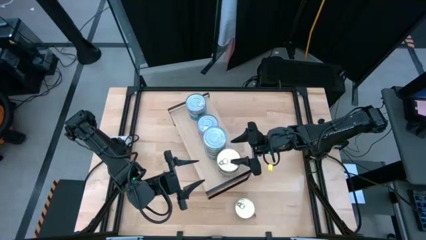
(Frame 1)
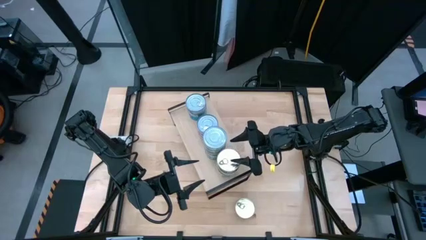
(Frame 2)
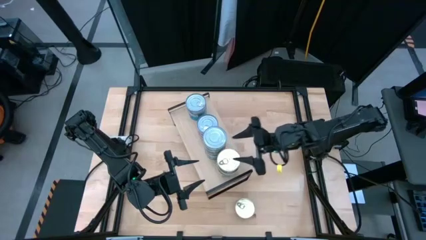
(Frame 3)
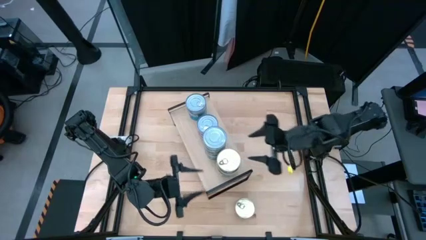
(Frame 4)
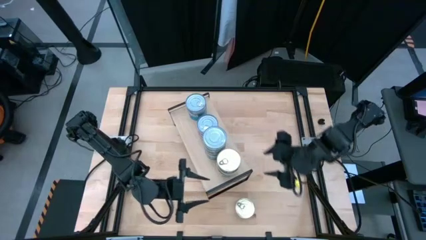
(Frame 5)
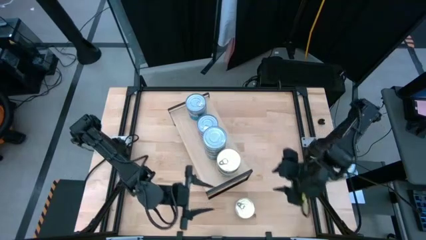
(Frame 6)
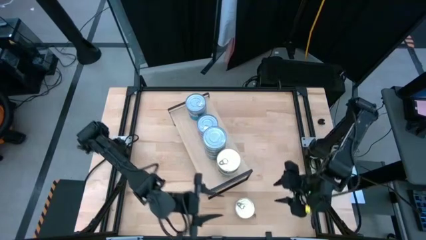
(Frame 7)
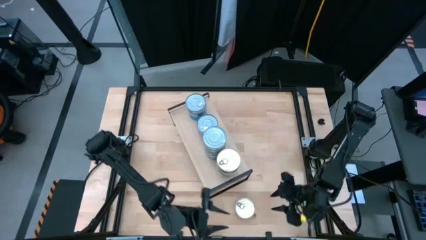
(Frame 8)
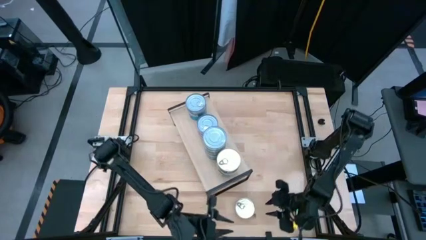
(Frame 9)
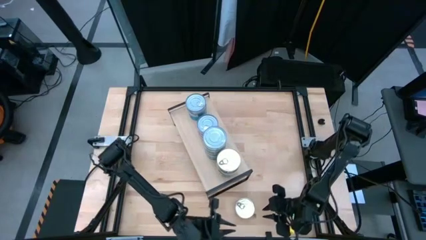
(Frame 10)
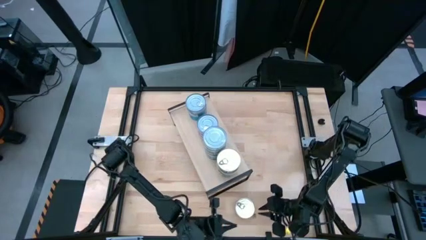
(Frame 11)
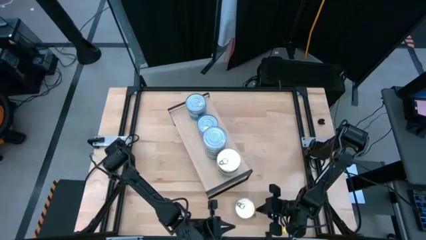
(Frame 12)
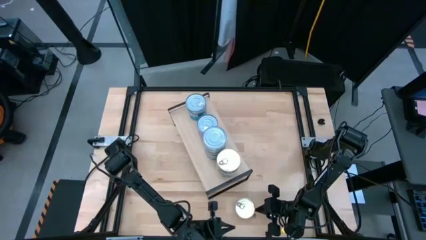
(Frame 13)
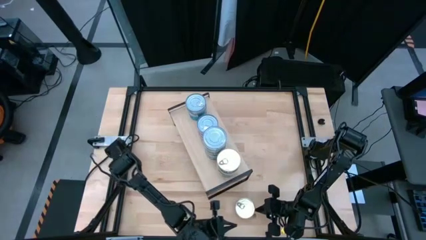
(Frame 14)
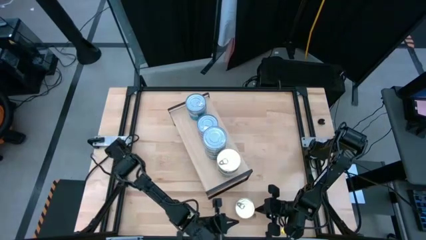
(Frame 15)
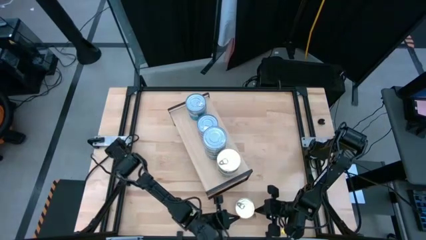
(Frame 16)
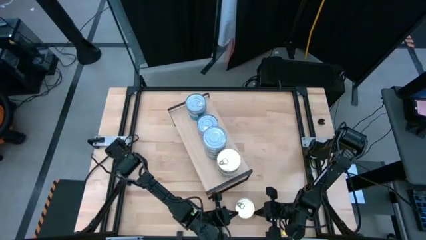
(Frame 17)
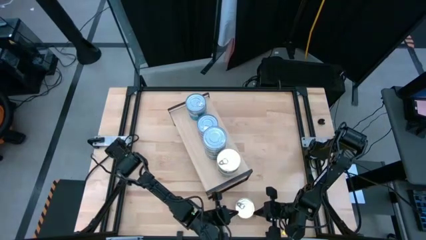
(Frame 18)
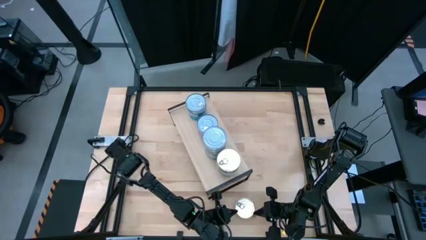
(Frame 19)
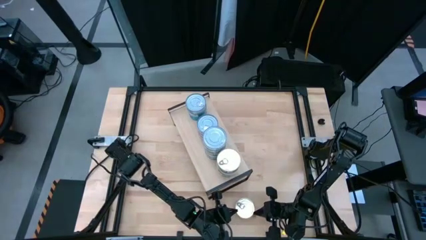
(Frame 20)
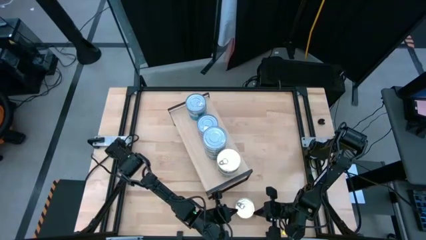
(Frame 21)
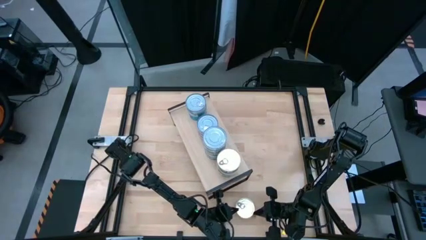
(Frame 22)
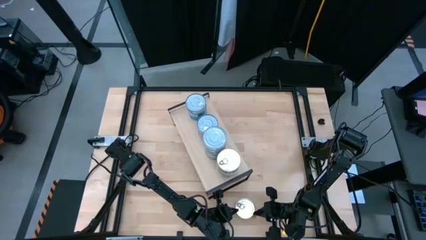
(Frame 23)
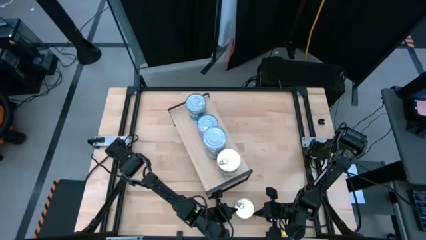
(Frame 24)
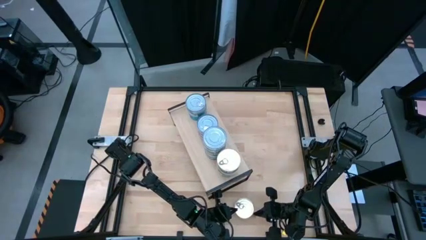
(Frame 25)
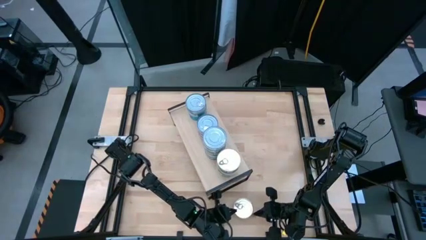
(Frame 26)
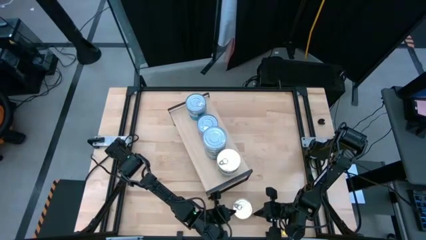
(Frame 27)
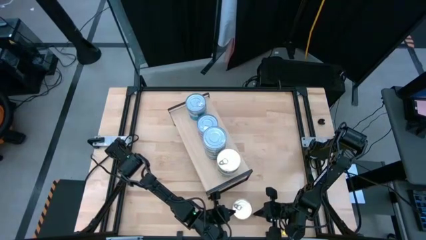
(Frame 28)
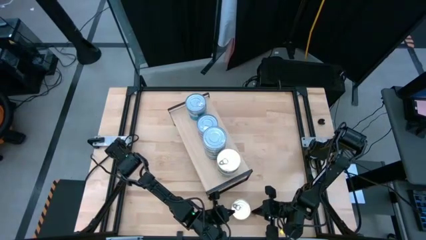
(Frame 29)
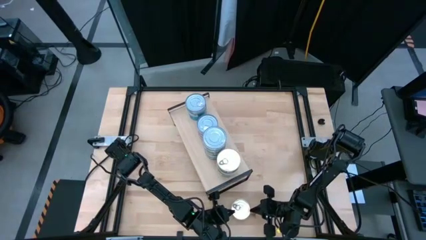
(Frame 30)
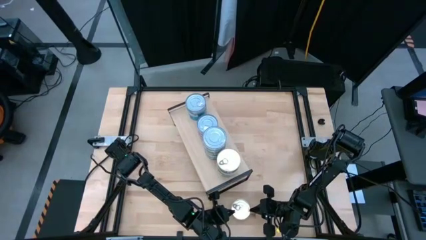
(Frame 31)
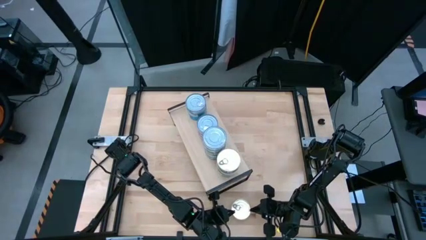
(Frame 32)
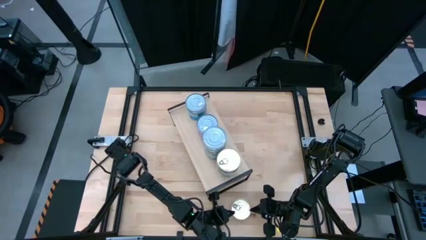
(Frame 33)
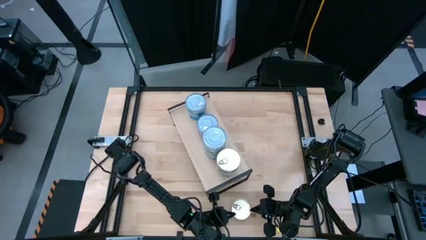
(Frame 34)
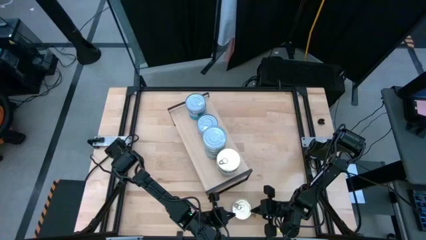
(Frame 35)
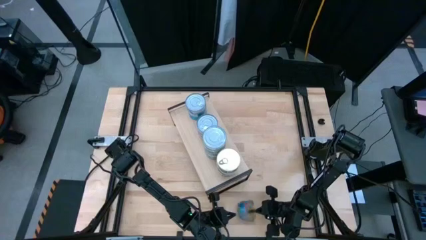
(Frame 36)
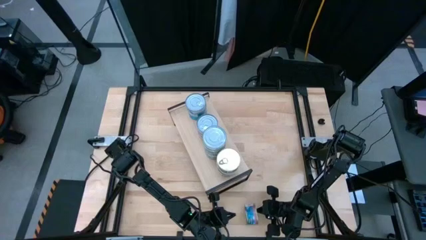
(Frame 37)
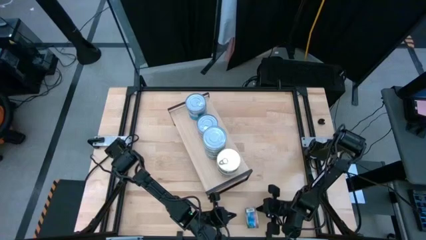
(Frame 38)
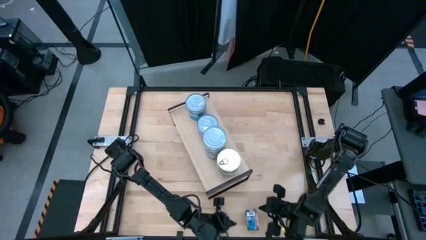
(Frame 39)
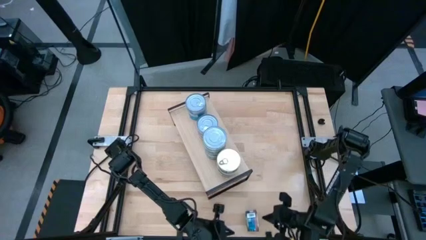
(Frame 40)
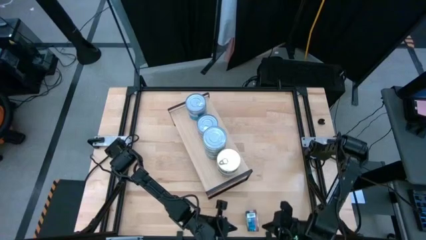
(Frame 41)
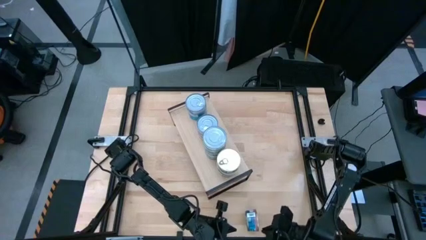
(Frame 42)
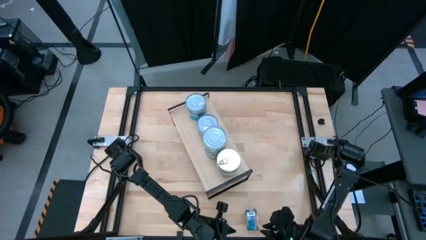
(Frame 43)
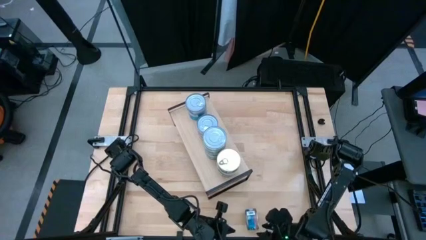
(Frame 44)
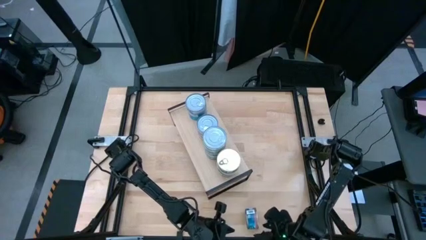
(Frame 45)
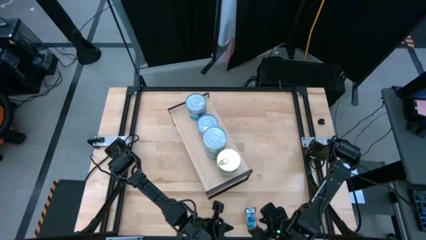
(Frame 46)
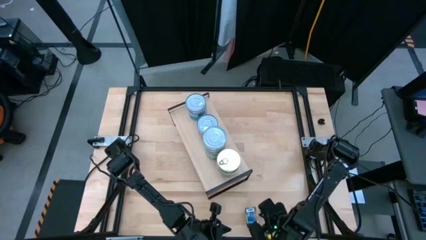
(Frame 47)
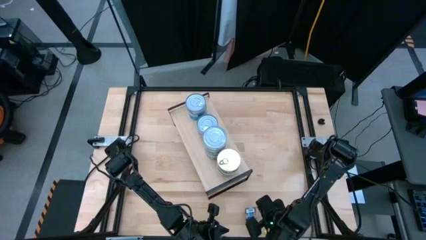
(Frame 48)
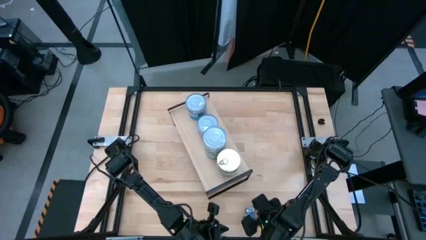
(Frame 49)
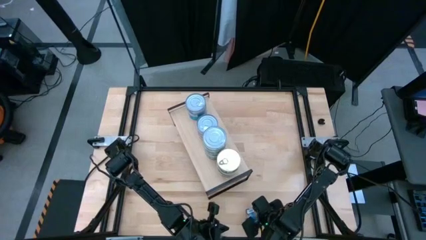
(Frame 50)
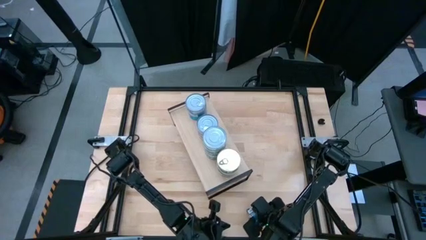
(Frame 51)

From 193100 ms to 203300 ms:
Task: Stack canned seafood by type on shelf
Stack the blue-pink tuna can on top of the blue-pink tuna cans on the shelf

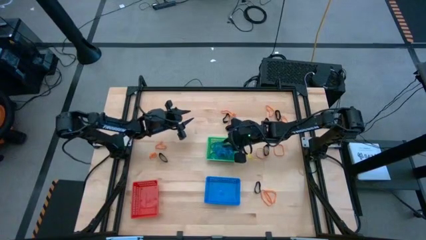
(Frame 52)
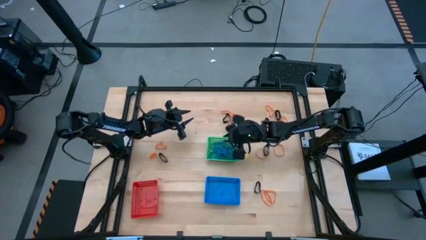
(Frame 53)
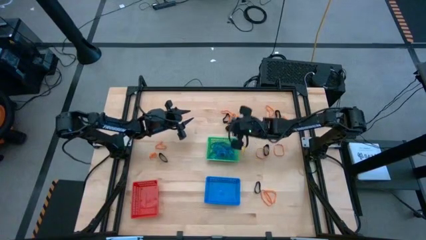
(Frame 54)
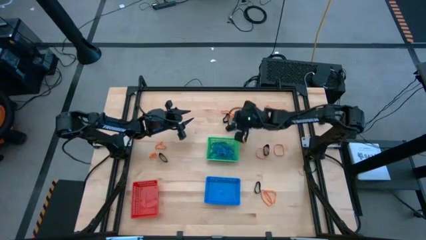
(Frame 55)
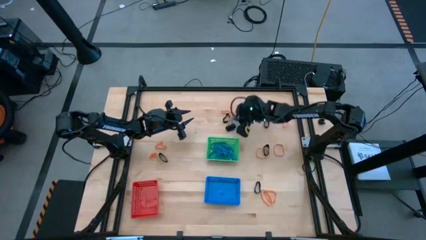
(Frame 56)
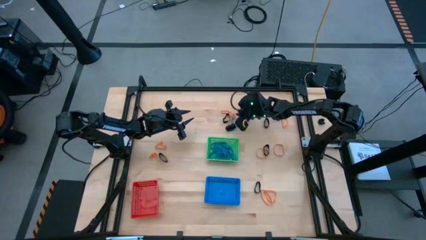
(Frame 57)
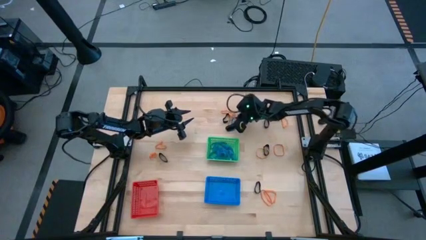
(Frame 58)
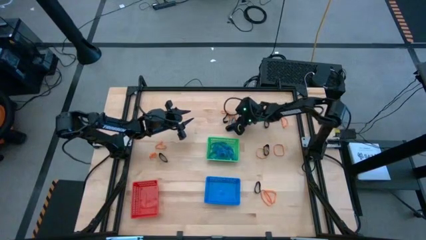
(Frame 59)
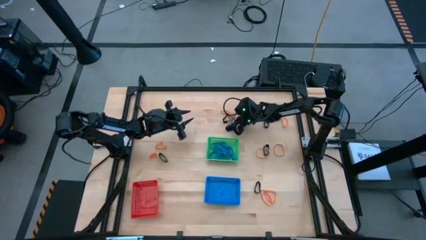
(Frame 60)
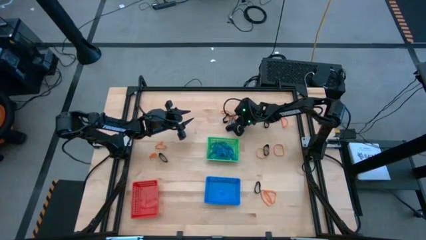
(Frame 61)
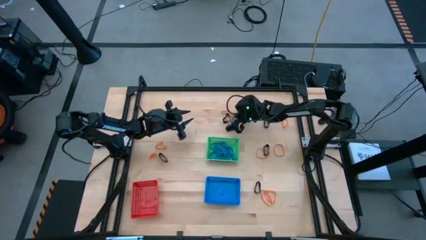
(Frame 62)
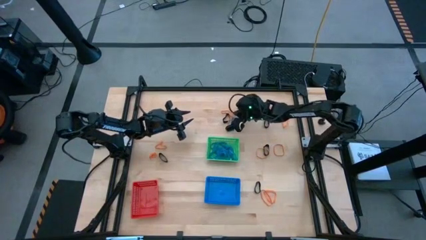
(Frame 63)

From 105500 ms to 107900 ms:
Task: Sort rubber bands into baskets
Put the blue rubberband into the green bin

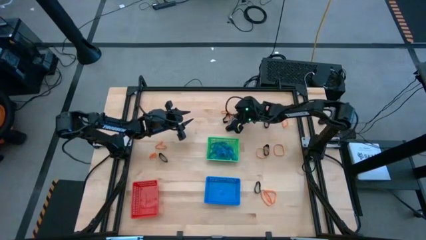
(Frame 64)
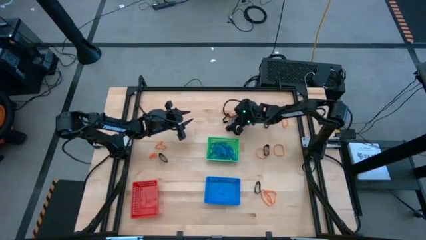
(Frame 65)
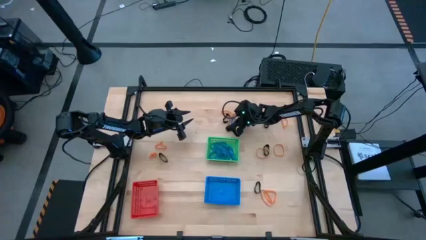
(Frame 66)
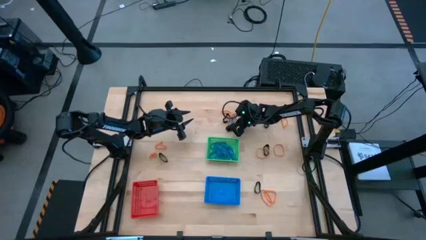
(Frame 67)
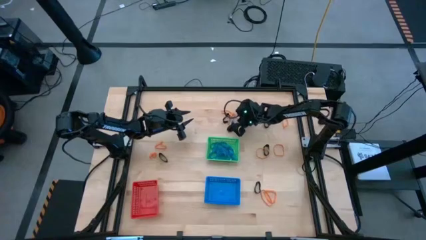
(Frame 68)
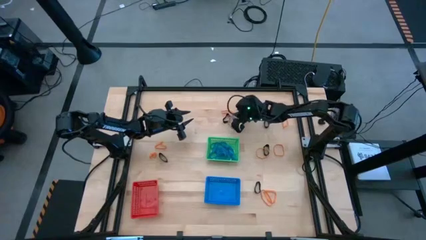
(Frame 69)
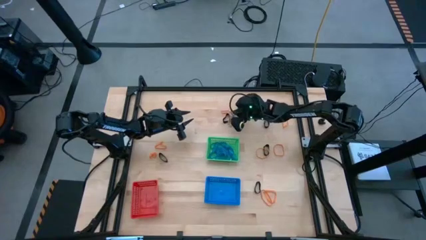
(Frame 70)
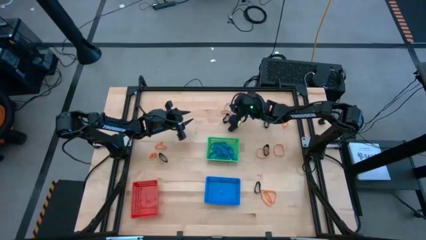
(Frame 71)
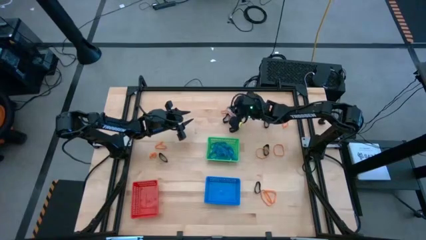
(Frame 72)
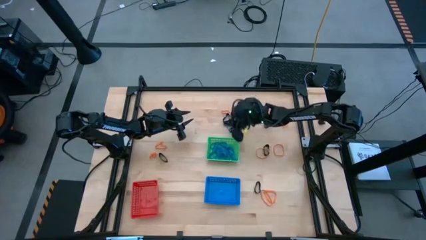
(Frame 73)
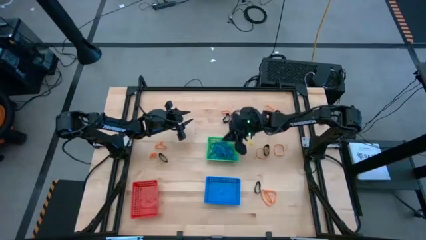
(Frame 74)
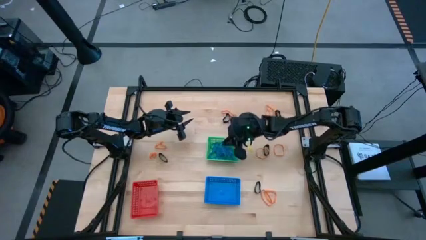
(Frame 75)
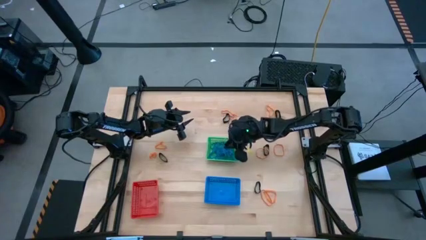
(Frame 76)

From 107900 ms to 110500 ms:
Put the blue rubberband into the green bin
